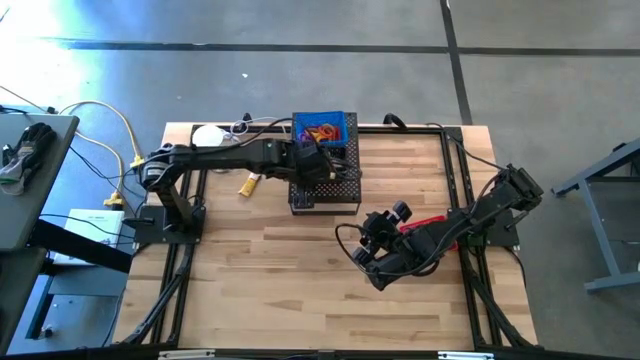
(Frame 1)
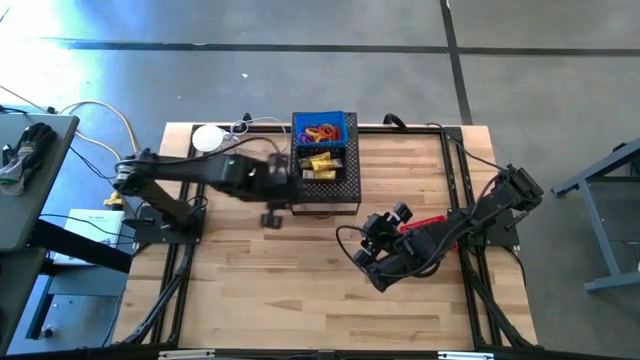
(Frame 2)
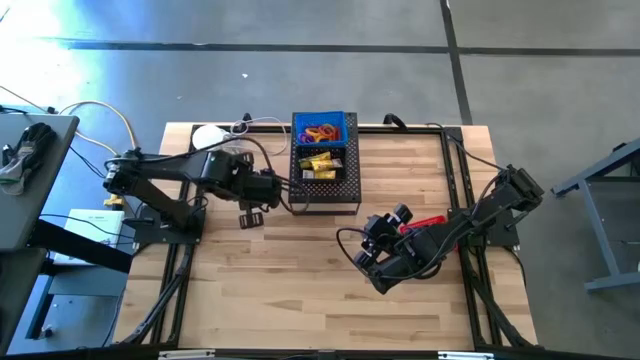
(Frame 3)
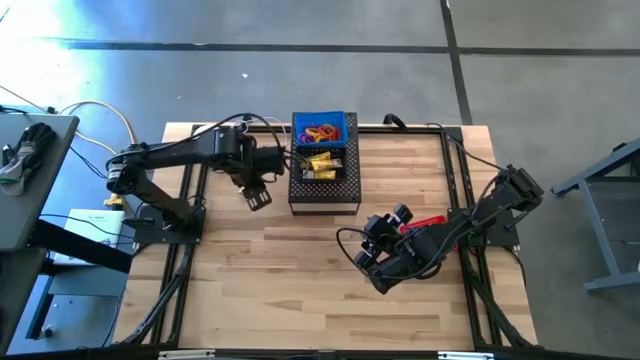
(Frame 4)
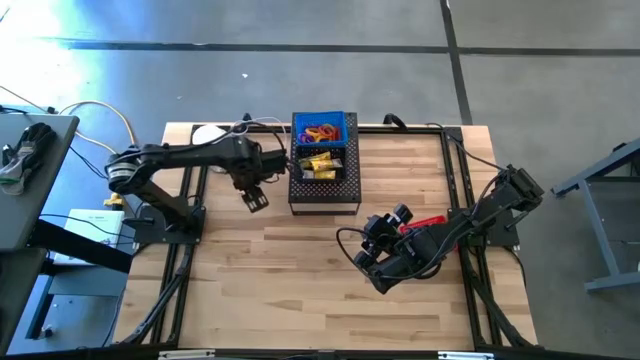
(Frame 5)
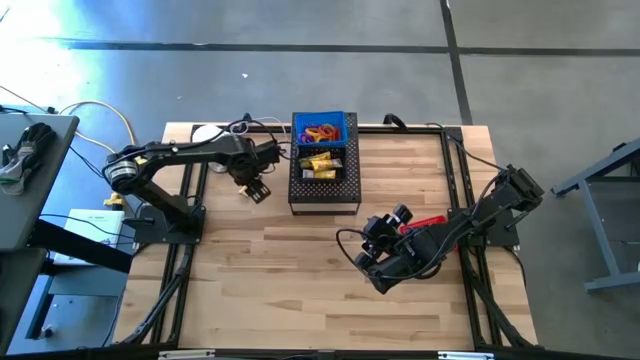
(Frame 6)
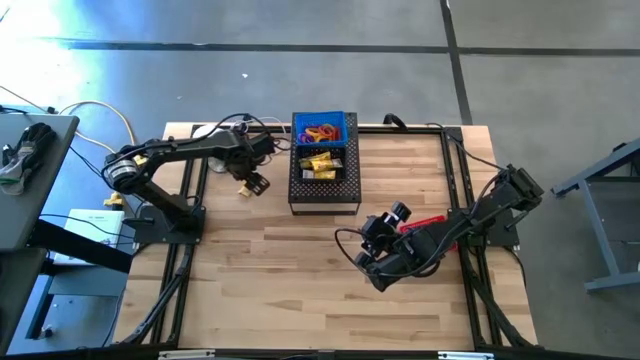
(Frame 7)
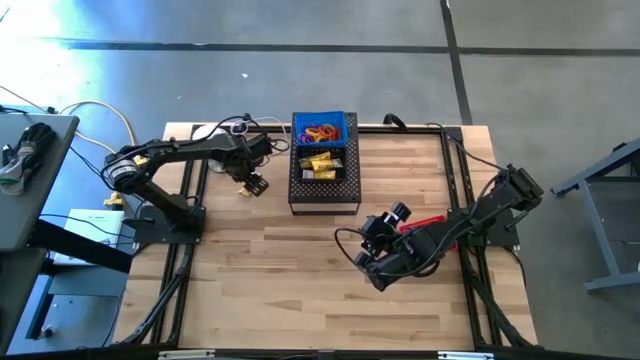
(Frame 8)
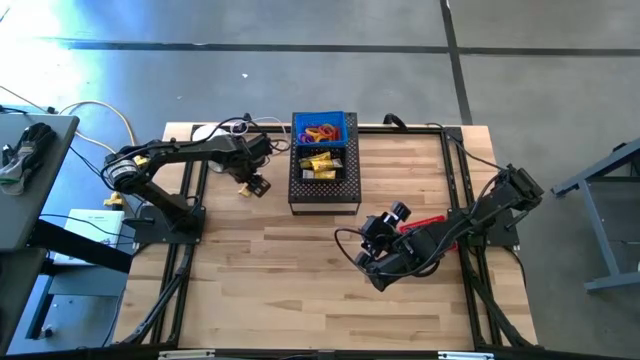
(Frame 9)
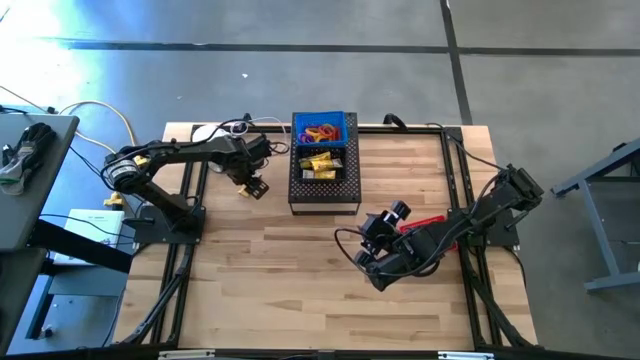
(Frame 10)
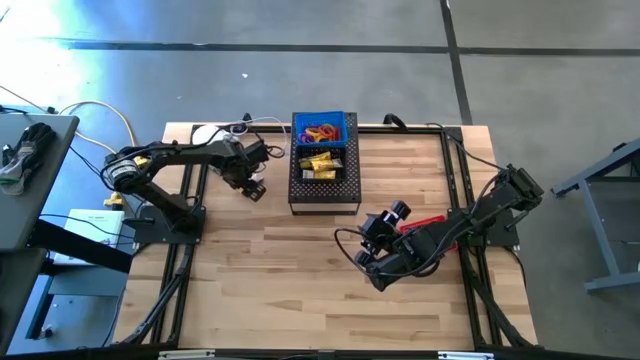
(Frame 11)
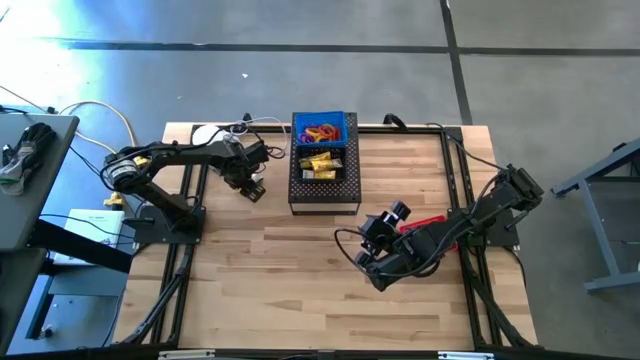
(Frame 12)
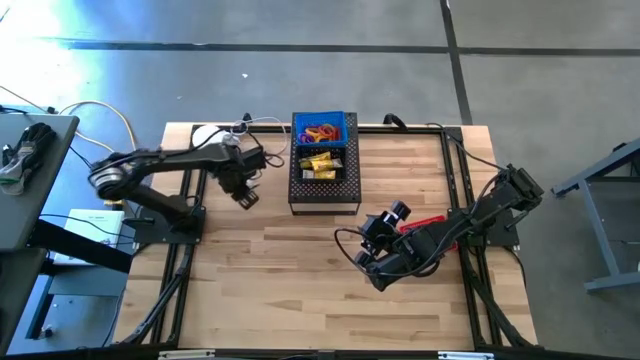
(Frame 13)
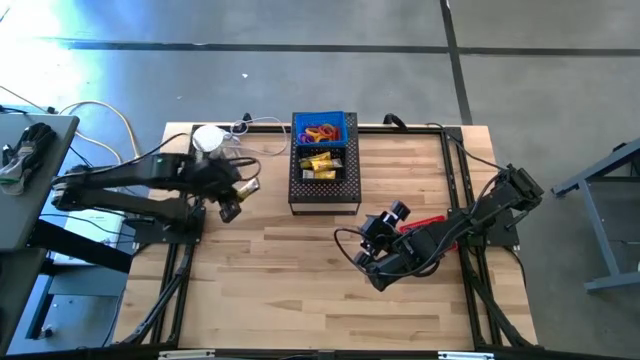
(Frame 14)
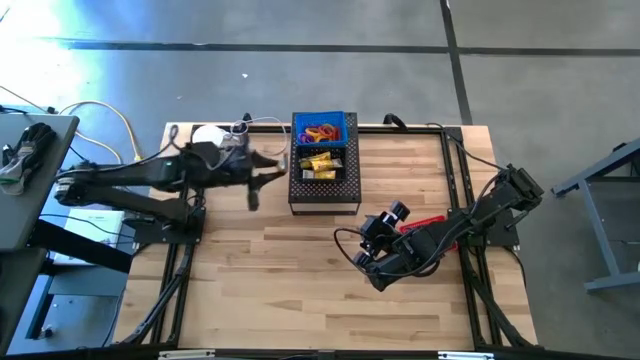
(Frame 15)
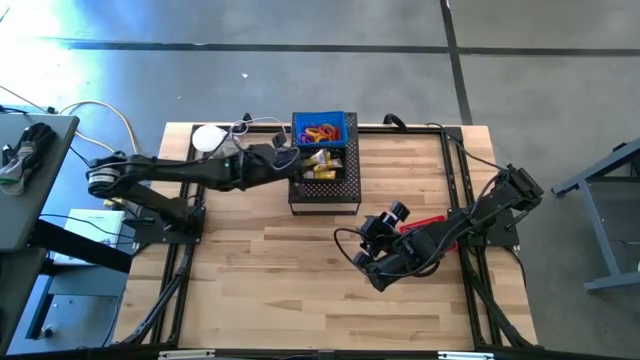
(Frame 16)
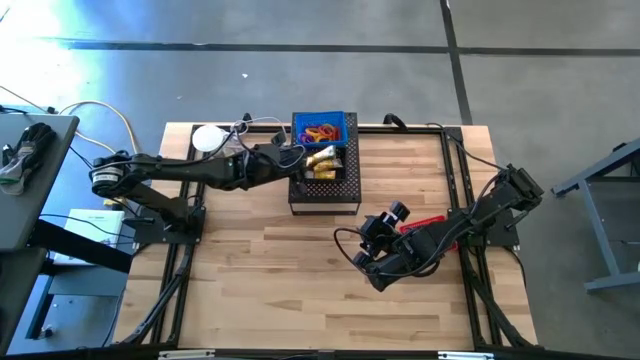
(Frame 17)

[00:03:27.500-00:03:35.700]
Task: Pick & Place Office Desk Supplies
Put the yellow crayon box into the black bin on the shelf

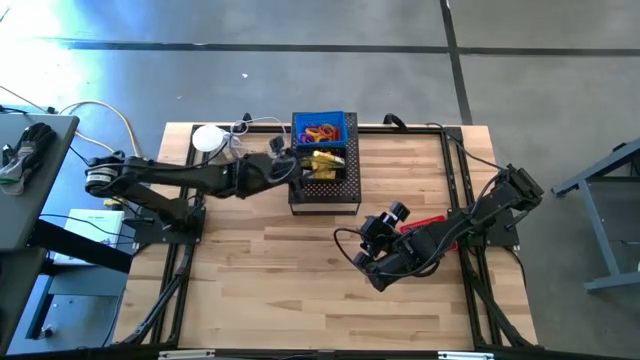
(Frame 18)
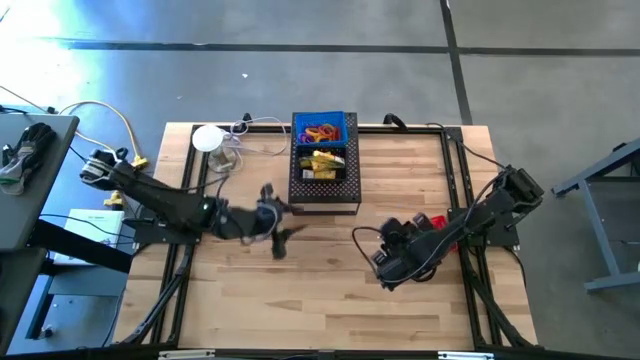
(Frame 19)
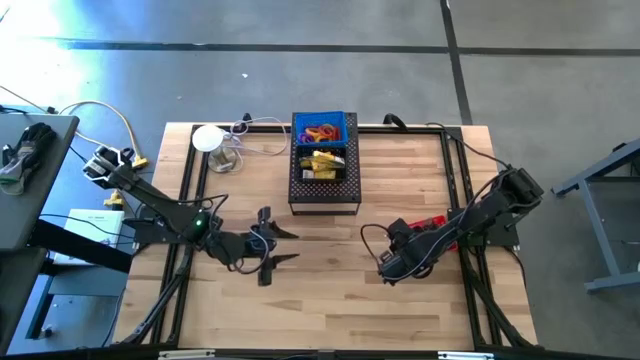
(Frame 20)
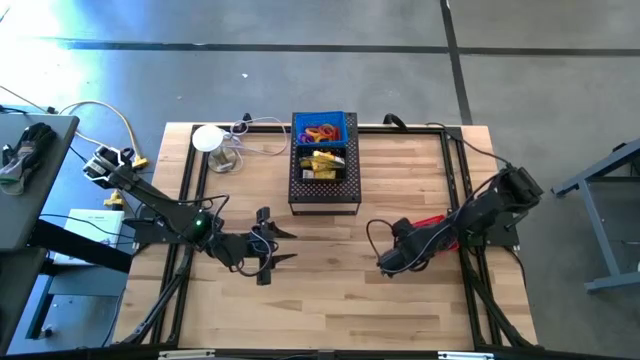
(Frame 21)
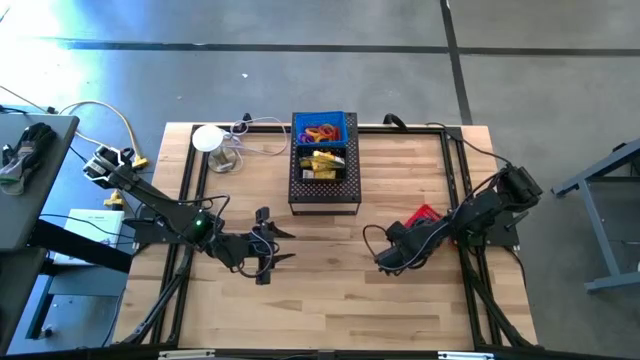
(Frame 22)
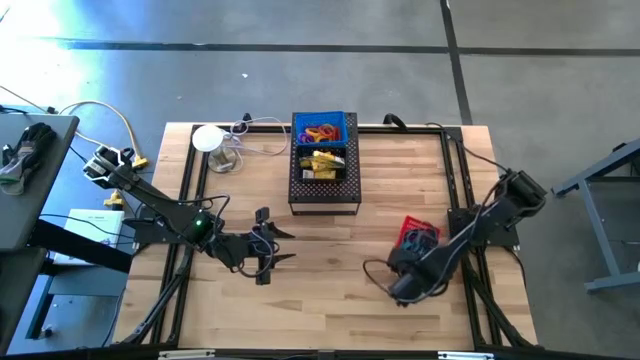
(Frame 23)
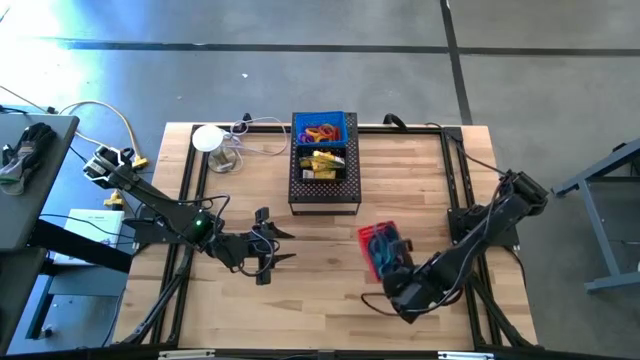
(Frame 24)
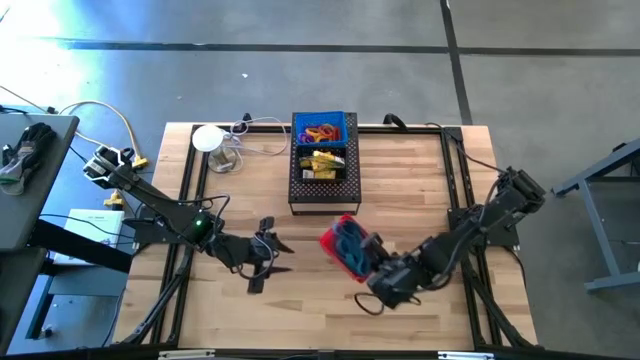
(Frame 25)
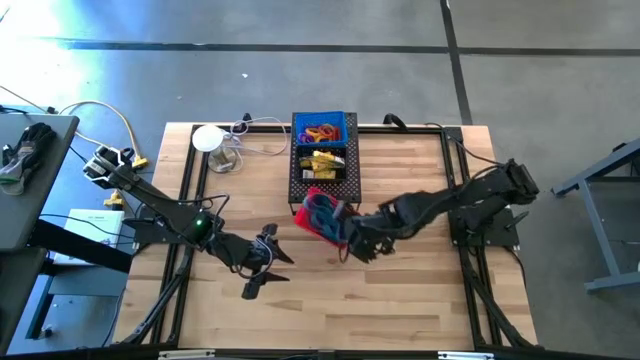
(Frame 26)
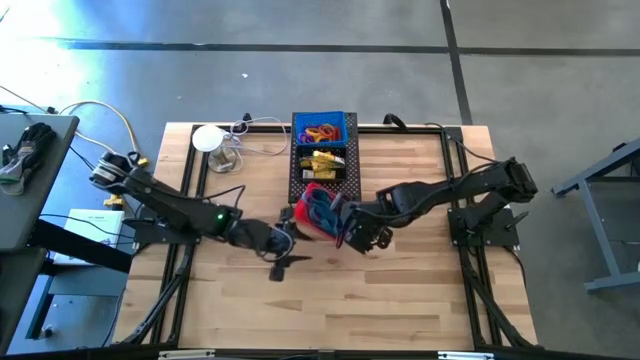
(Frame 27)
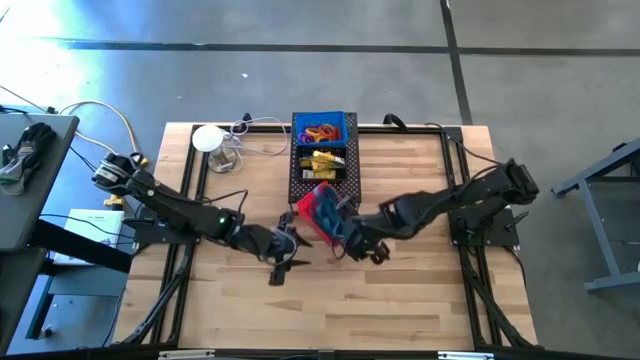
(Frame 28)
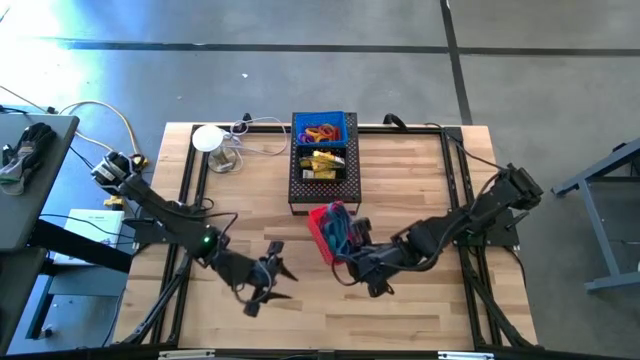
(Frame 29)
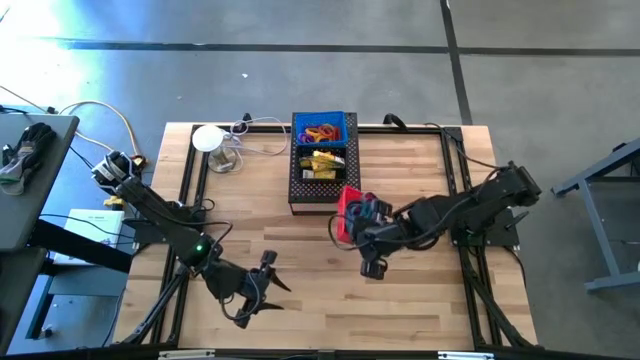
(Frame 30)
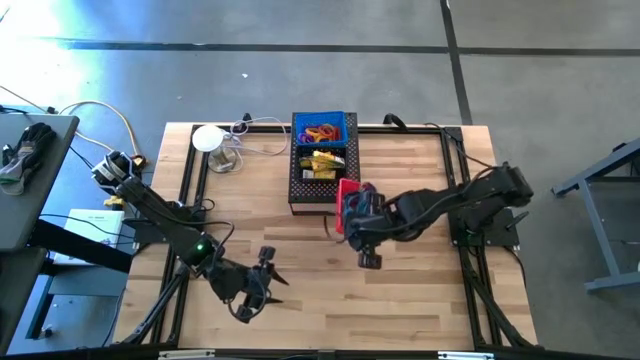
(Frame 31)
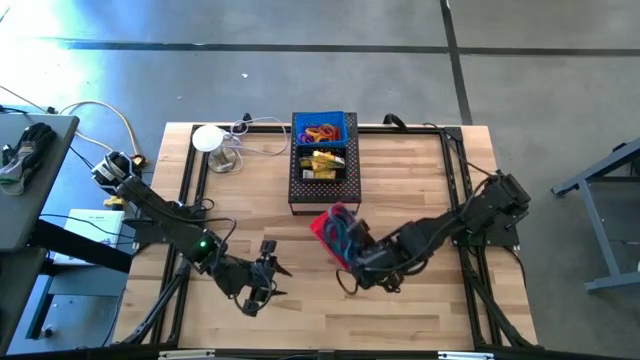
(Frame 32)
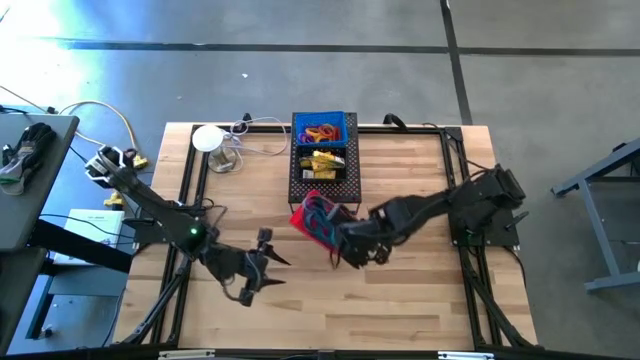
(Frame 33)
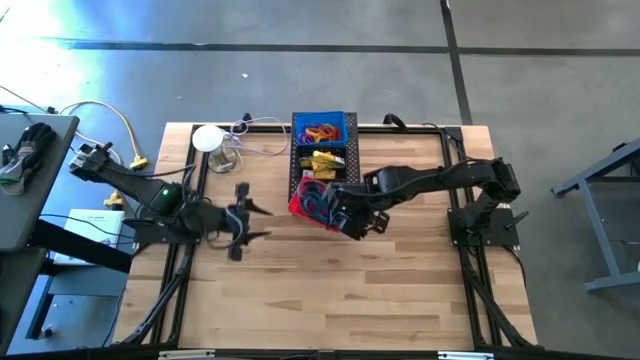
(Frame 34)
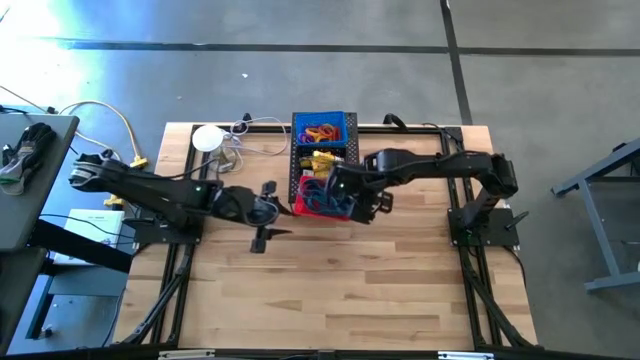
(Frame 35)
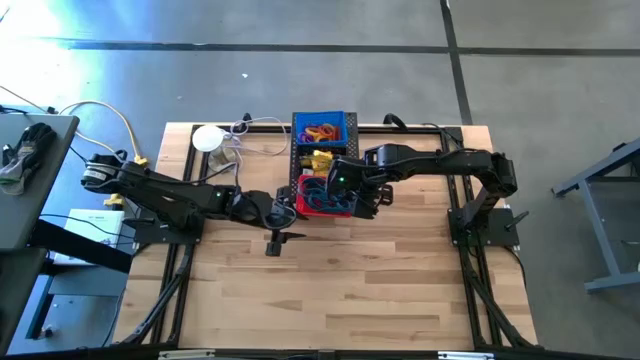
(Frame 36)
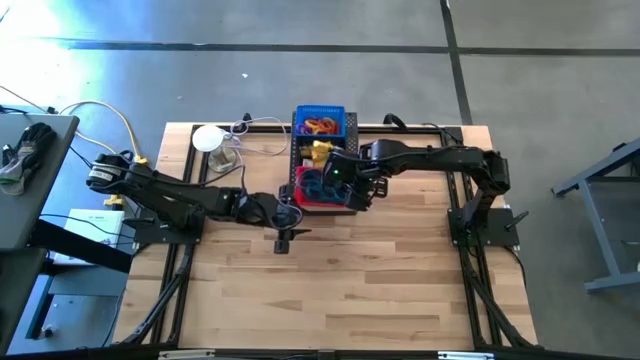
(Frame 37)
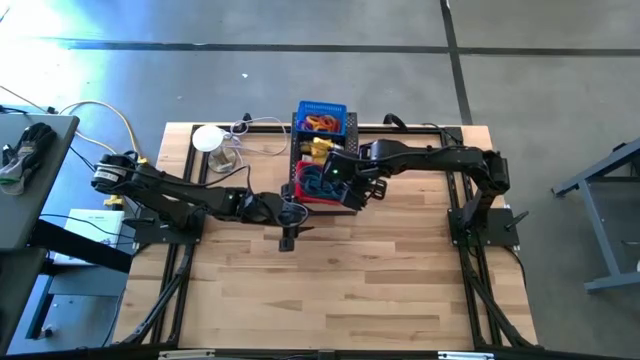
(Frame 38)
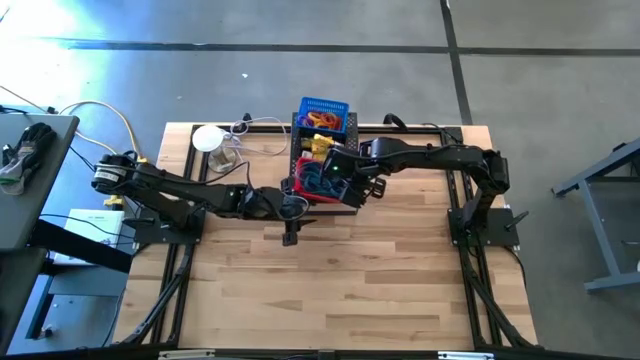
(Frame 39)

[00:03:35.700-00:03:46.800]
Put the red bin on the shelf

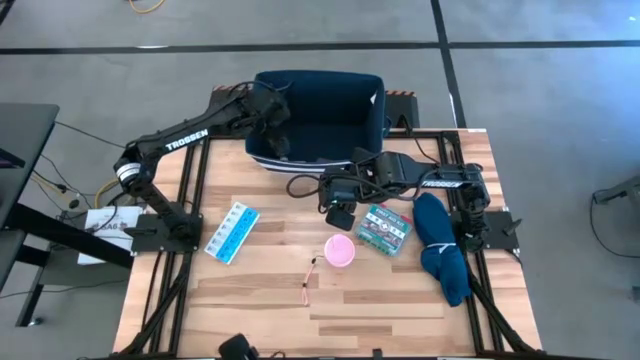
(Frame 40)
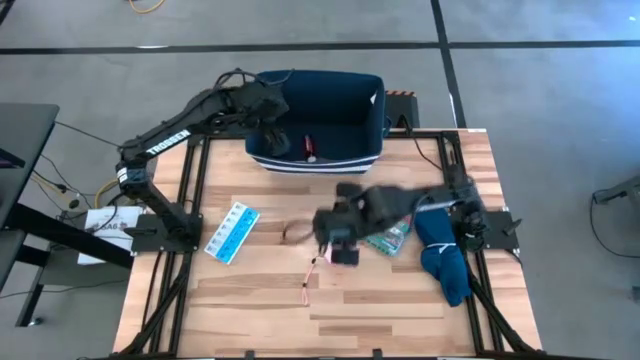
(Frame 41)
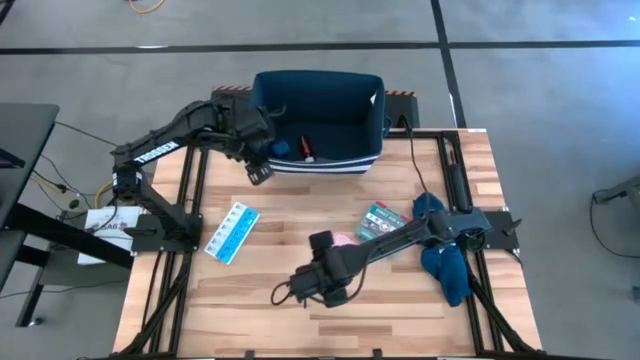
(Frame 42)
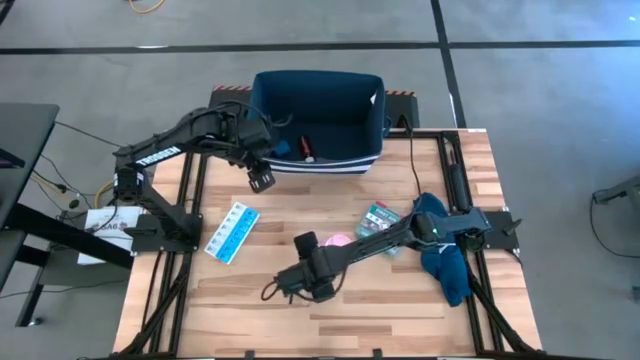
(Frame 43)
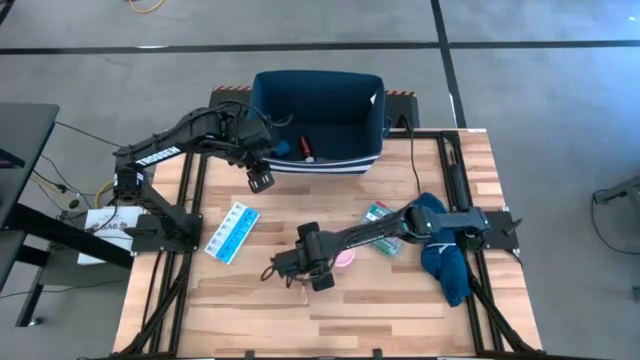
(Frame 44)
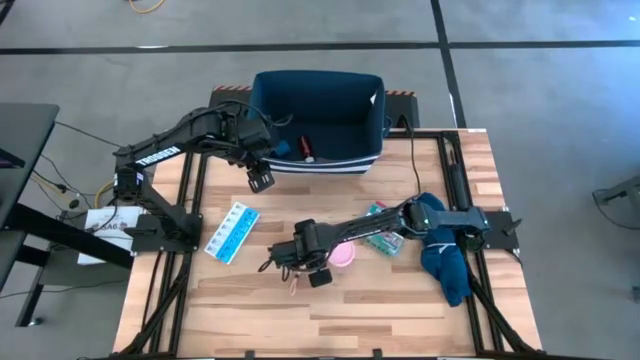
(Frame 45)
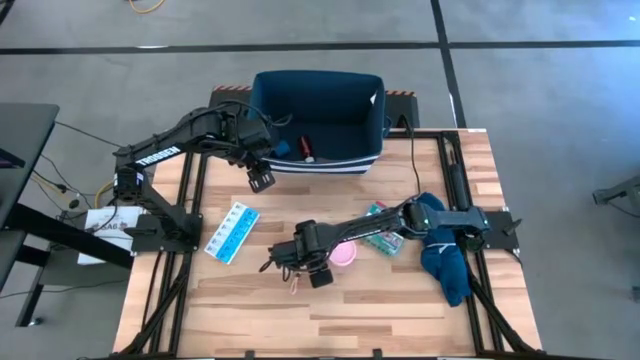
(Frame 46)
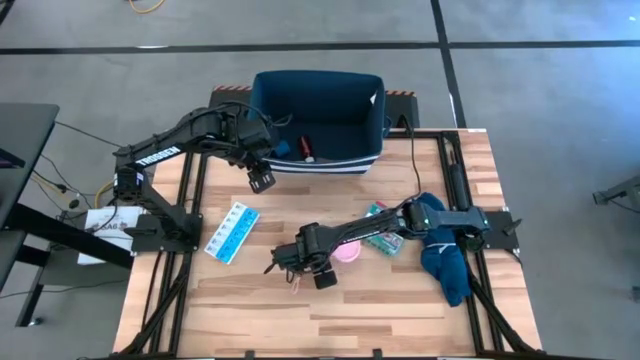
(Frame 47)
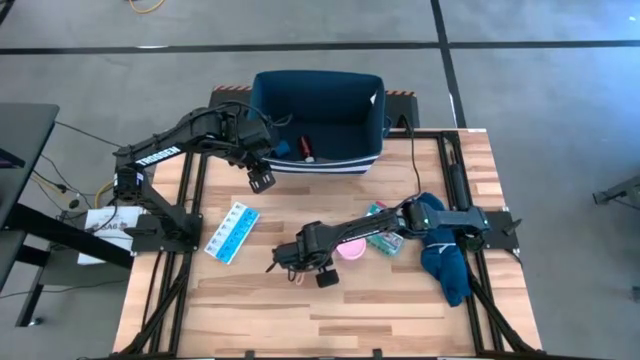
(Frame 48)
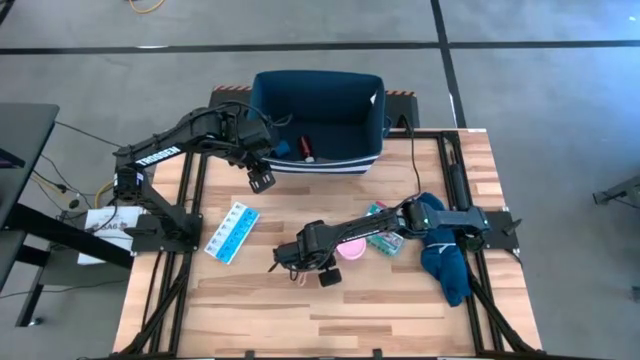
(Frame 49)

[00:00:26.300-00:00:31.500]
Task: Pick & place medical supplies in basket/bin
Put the pink container in the blue bin
